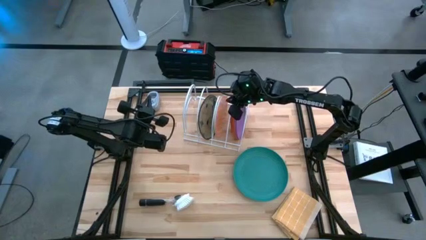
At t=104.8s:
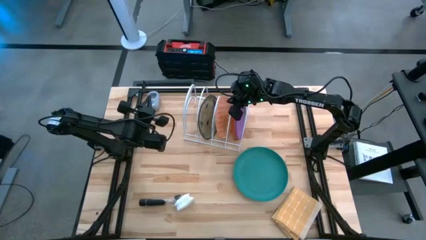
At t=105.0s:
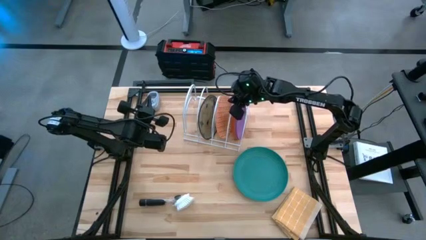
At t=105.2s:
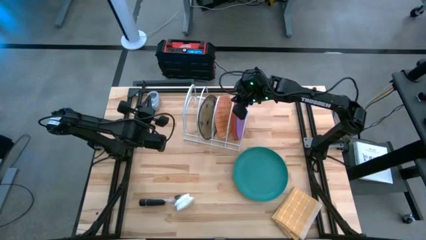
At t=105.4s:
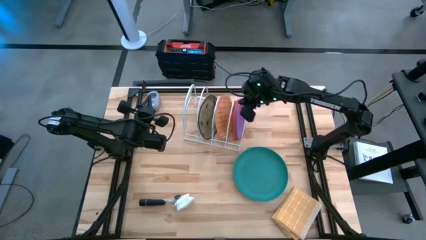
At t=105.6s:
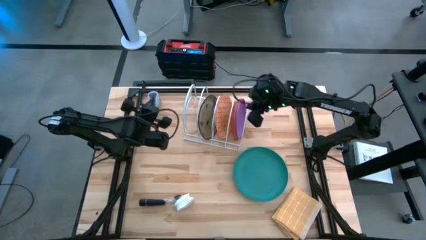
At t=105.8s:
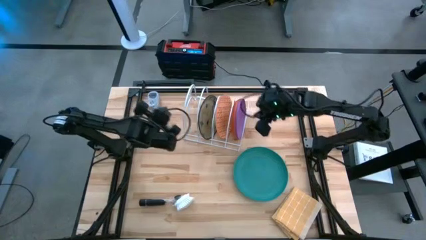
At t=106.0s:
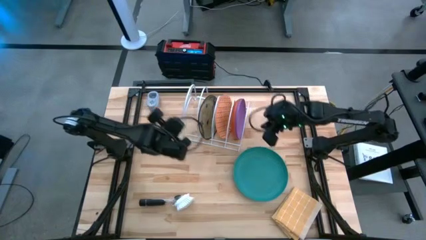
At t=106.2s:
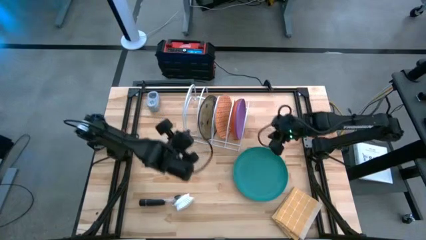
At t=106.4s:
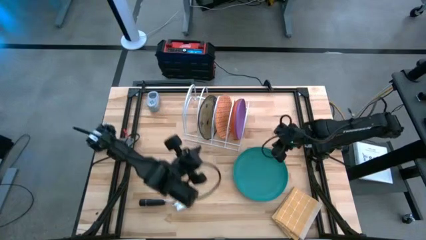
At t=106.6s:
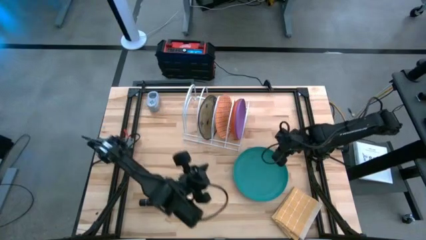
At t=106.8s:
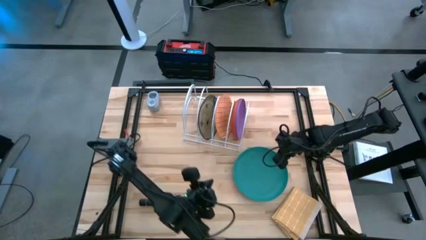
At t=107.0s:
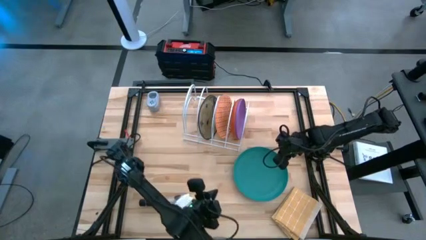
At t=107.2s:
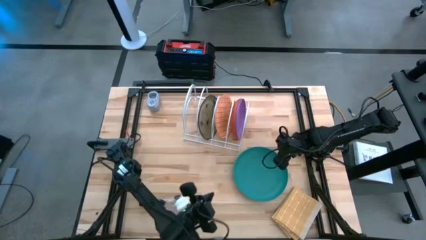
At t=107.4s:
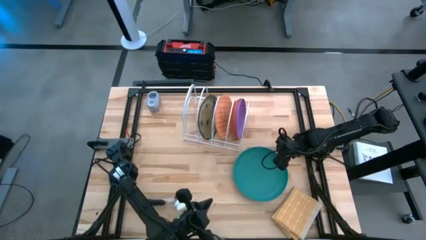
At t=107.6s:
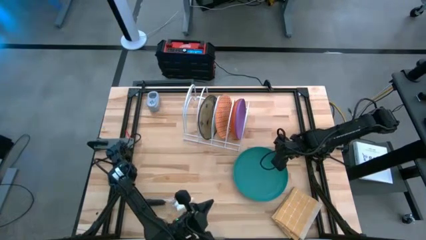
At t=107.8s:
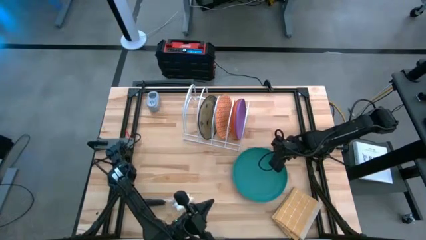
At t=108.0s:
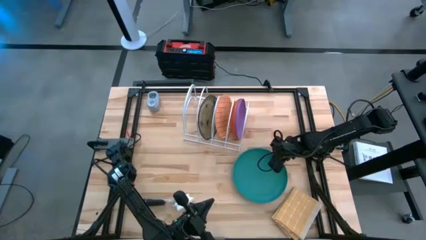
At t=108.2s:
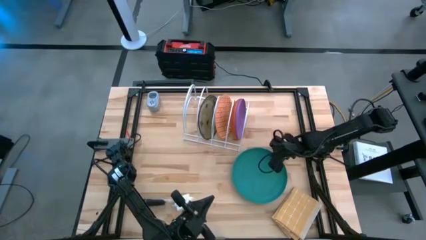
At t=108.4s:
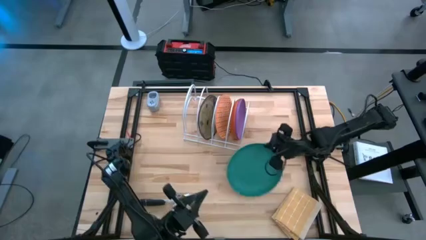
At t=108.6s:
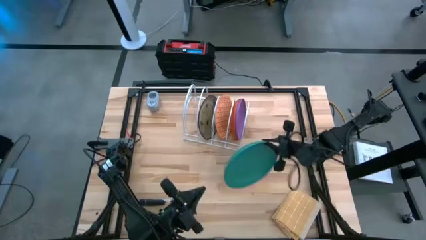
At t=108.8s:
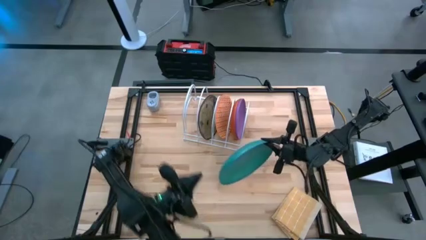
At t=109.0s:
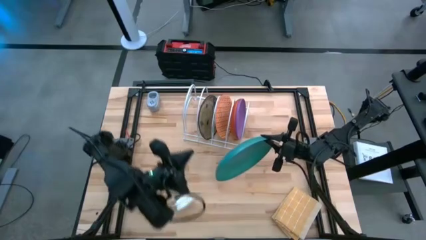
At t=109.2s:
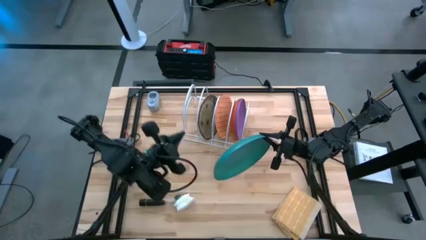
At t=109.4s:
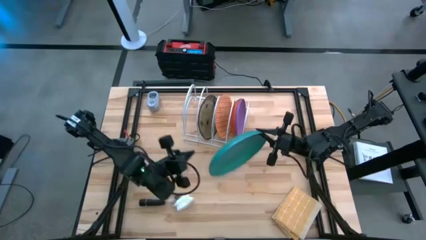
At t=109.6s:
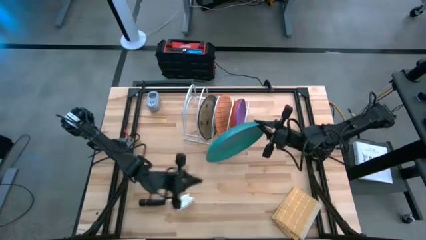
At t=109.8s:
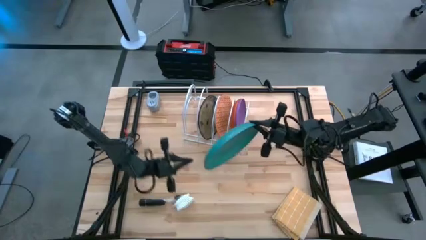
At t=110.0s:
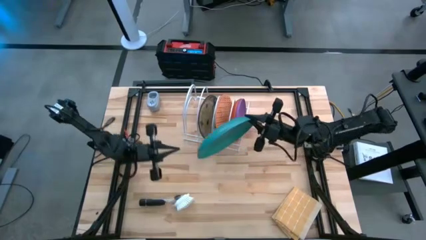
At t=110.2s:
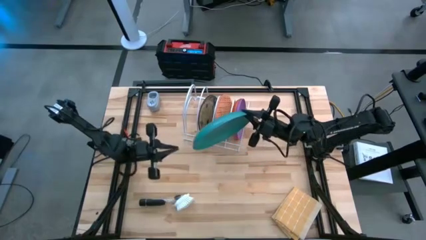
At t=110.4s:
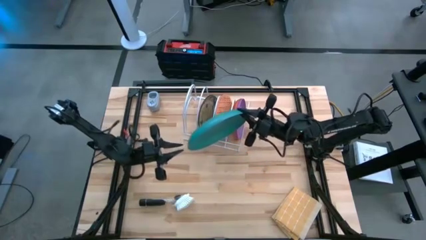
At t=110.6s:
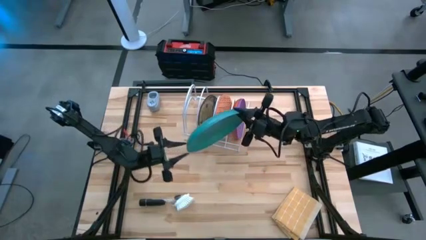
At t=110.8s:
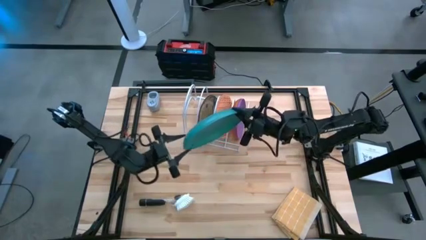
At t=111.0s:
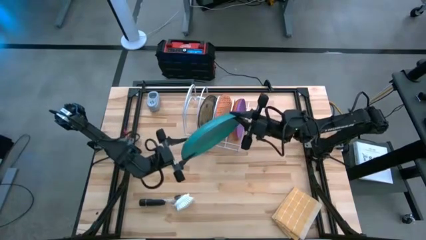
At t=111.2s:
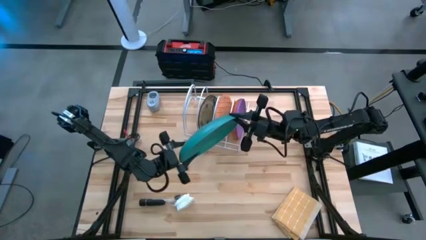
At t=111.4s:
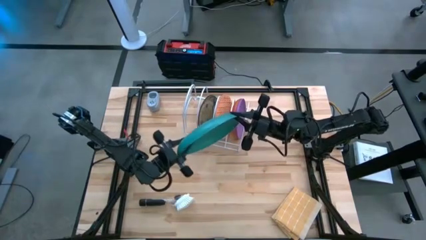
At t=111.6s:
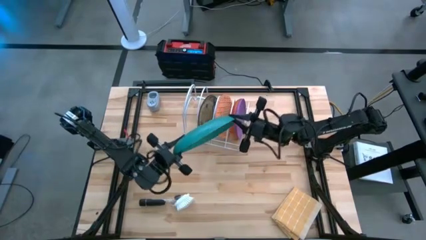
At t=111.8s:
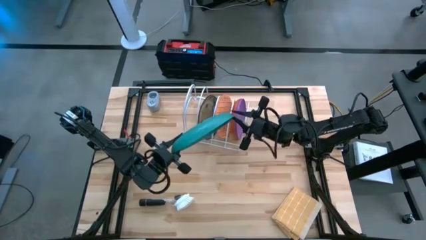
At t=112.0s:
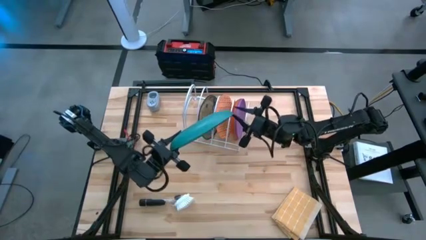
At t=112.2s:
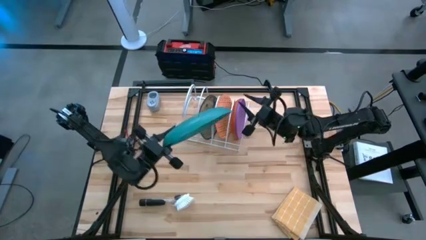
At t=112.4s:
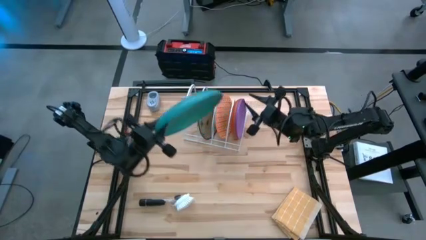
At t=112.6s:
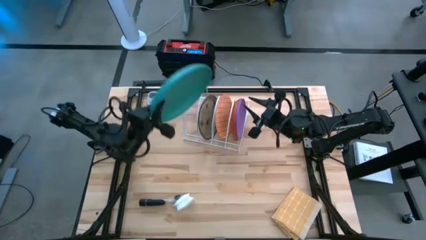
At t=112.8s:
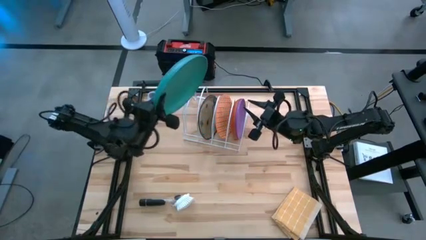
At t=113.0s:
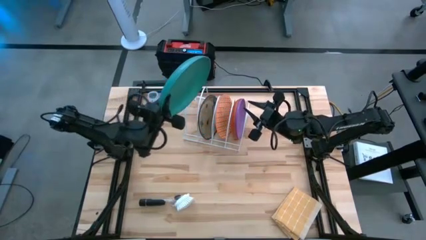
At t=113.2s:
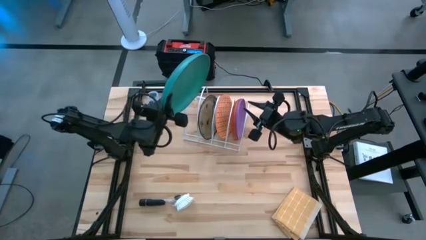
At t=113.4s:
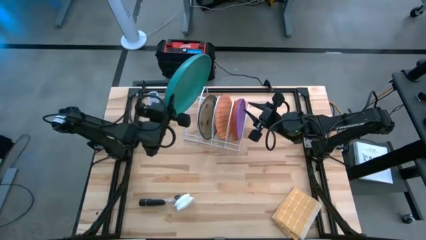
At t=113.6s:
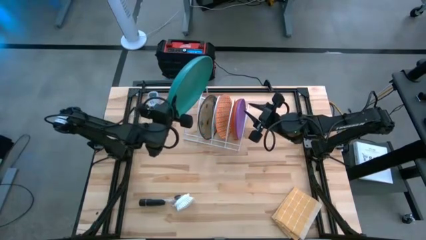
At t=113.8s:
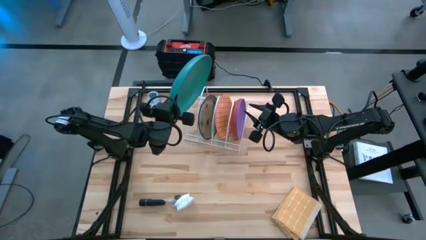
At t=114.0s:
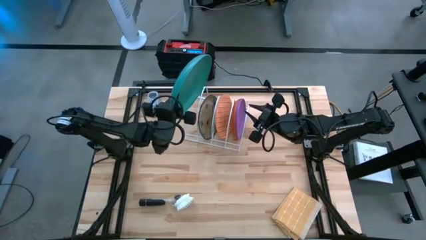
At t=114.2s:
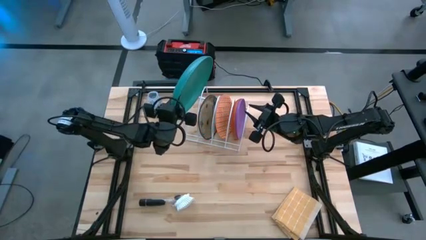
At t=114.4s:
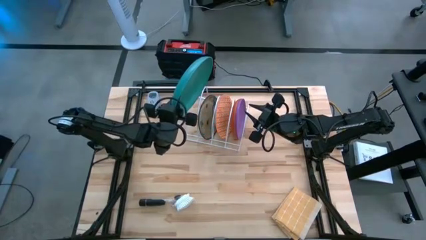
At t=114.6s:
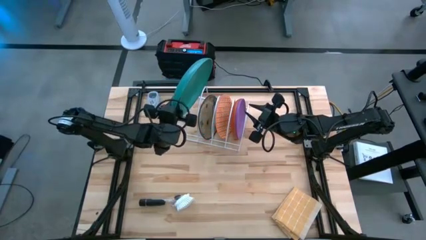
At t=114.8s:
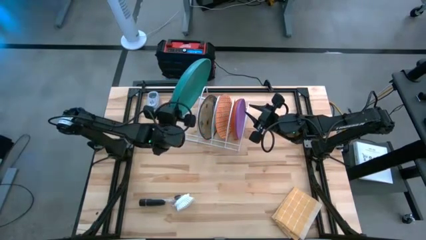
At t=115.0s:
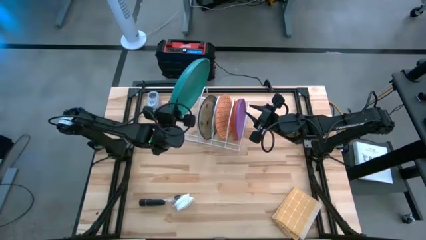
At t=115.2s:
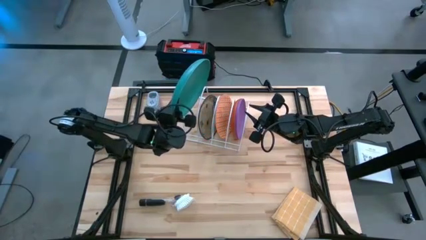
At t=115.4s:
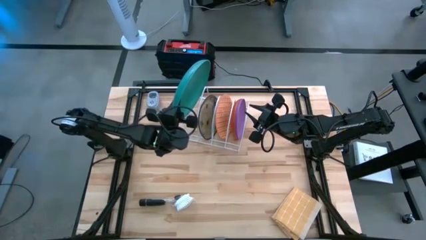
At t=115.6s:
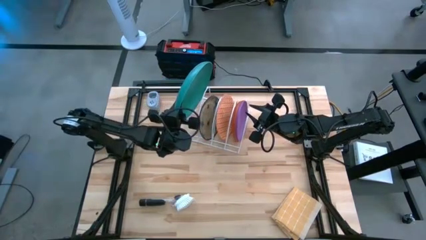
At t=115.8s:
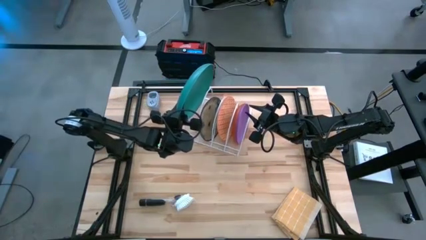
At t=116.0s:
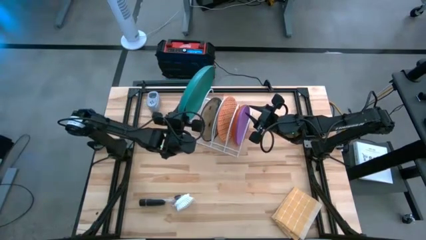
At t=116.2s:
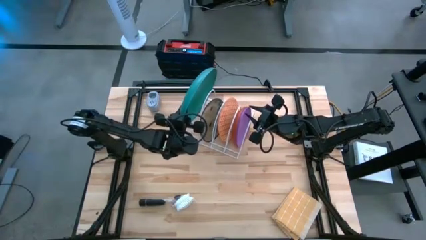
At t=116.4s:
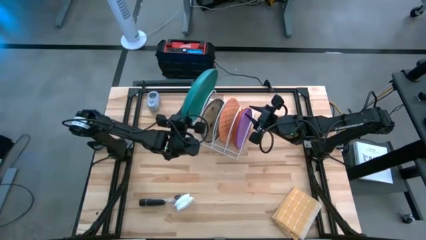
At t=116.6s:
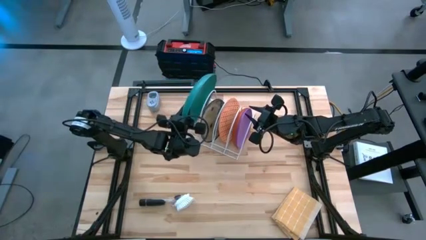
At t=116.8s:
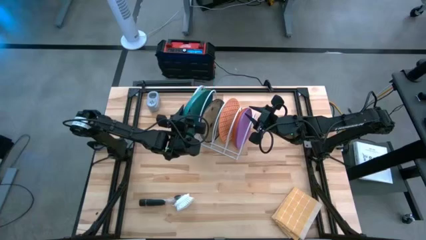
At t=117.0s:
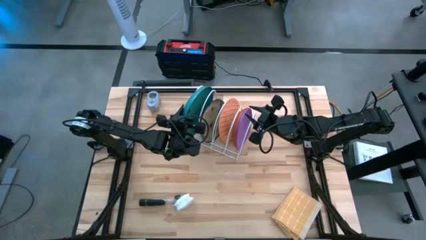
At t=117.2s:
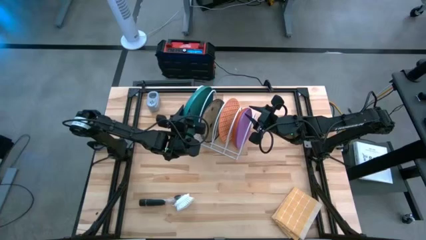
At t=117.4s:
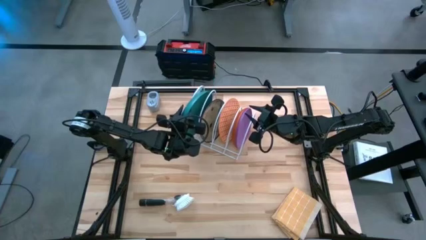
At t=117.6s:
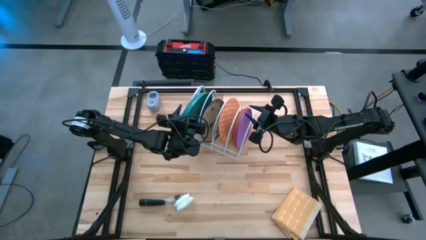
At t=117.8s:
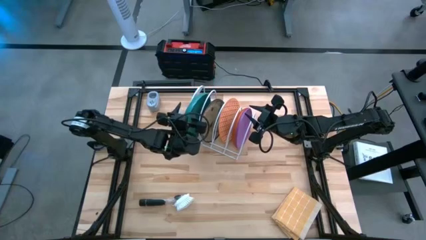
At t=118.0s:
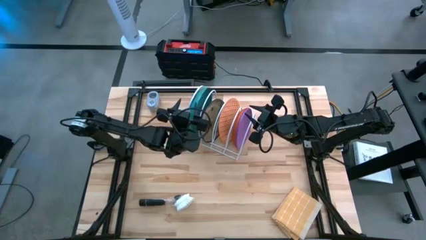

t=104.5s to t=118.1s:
Task: Sort dishes
Put the blue plate into the dish rack

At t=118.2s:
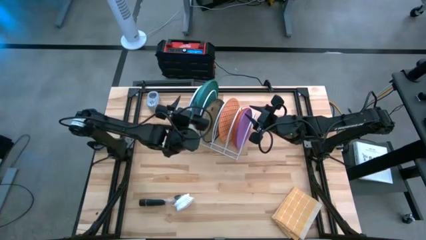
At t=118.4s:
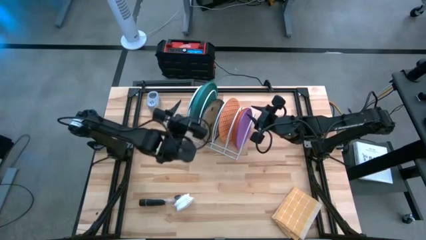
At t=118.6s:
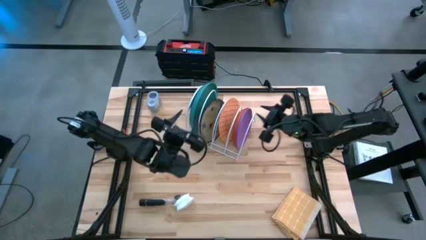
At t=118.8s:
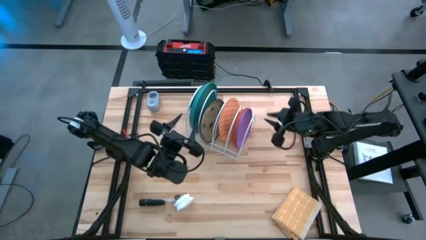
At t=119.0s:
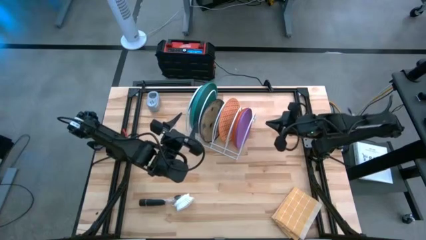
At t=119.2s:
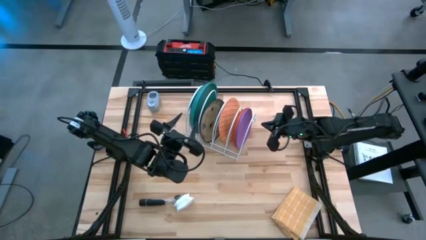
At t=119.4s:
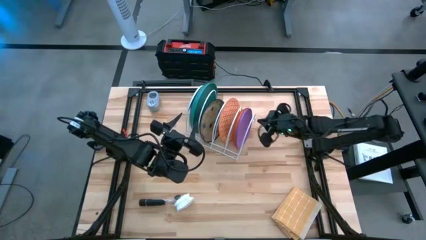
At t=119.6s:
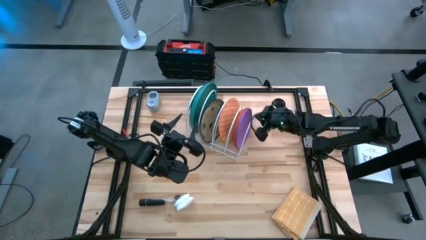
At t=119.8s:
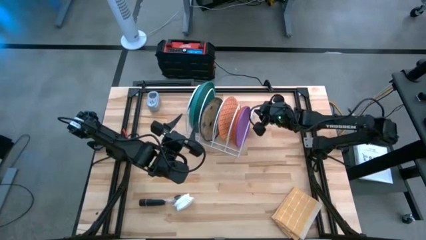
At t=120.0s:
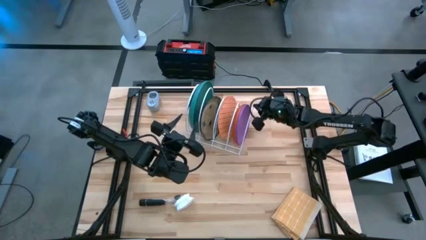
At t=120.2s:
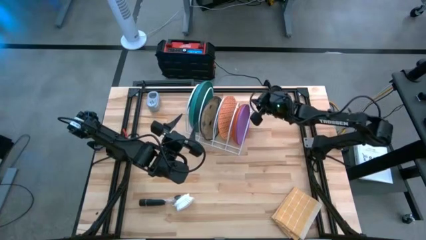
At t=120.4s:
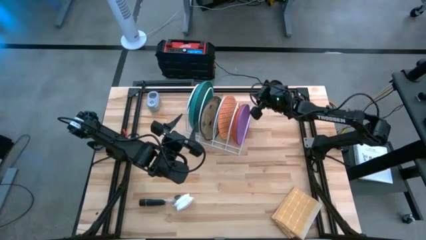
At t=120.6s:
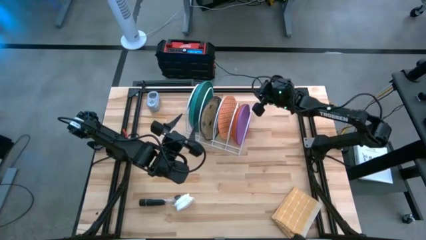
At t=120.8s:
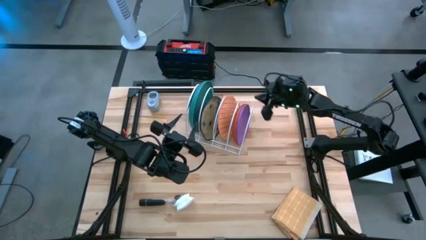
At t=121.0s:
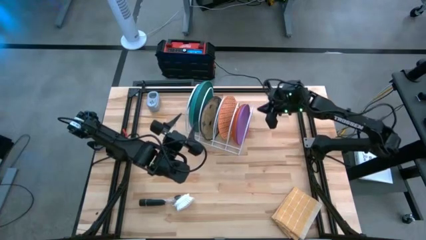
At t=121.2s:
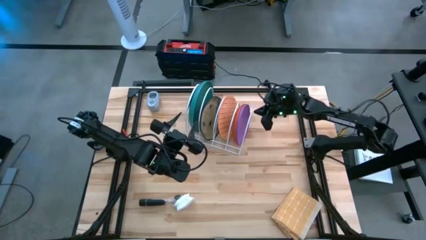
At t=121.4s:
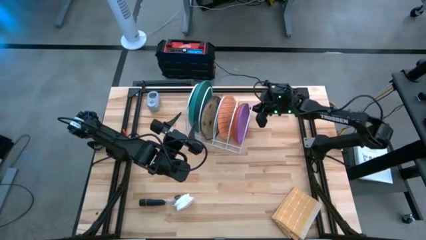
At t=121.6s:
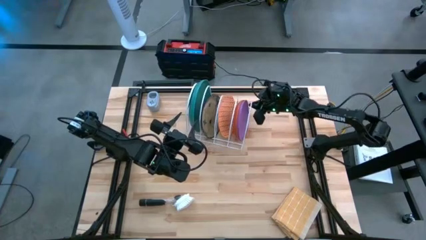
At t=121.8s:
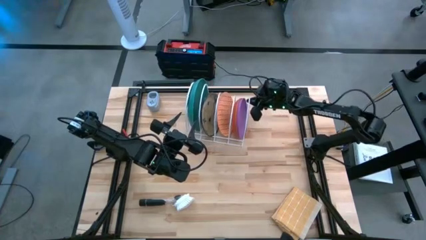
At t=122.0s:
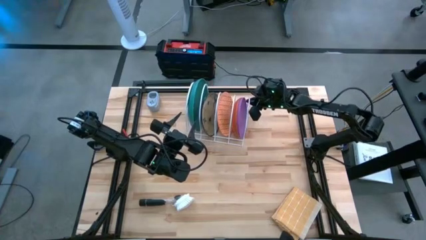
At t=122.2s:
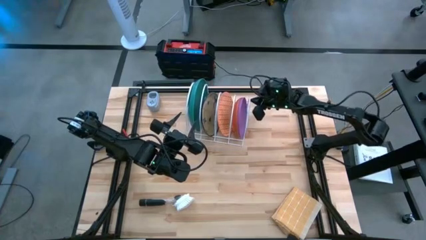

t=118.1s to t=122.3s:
Adjust the dish rack on the table
